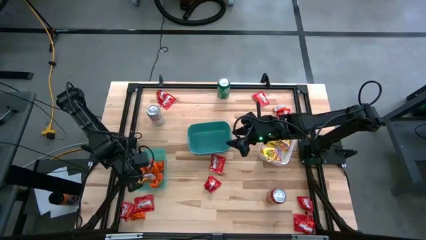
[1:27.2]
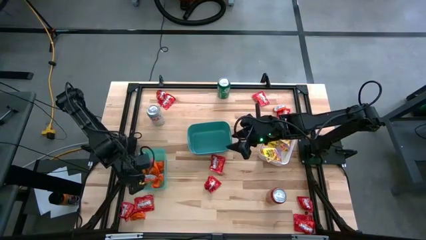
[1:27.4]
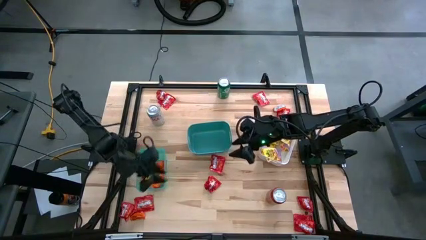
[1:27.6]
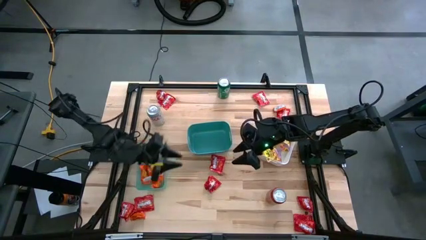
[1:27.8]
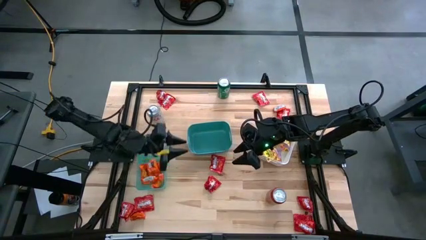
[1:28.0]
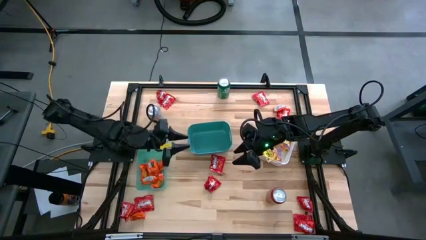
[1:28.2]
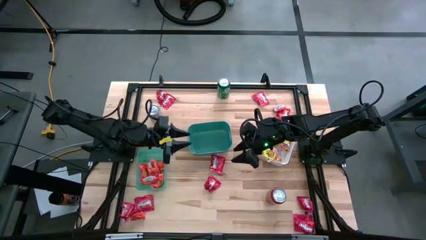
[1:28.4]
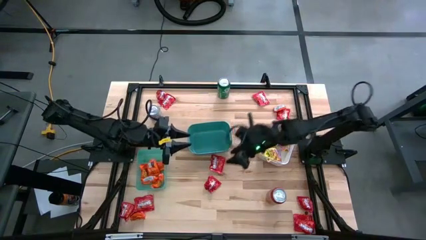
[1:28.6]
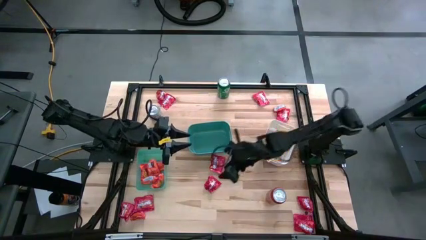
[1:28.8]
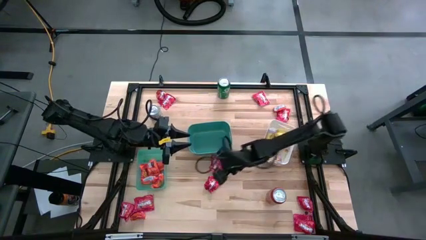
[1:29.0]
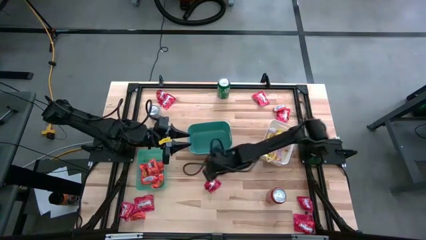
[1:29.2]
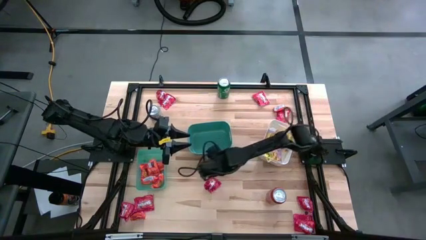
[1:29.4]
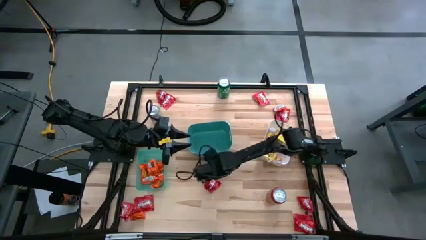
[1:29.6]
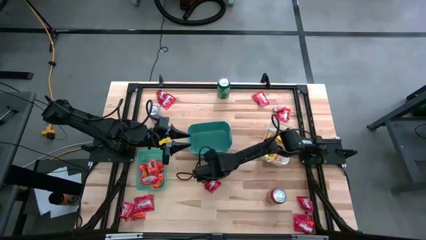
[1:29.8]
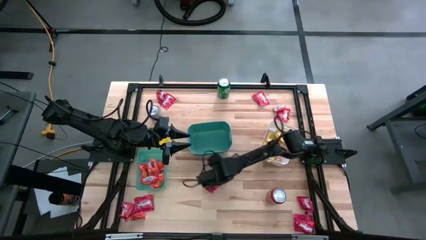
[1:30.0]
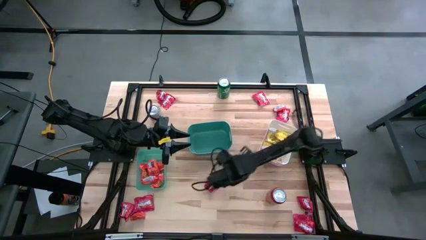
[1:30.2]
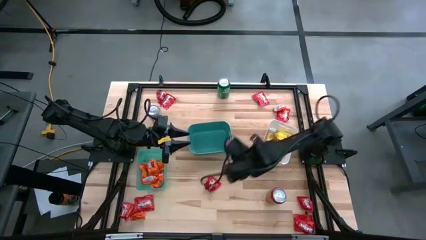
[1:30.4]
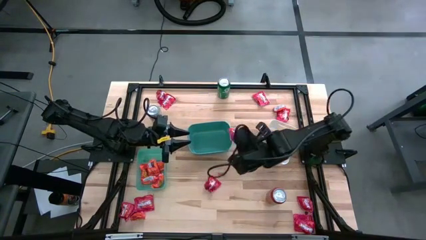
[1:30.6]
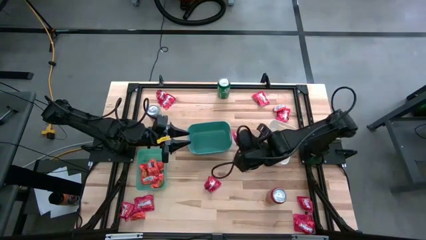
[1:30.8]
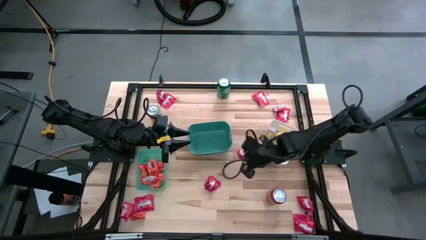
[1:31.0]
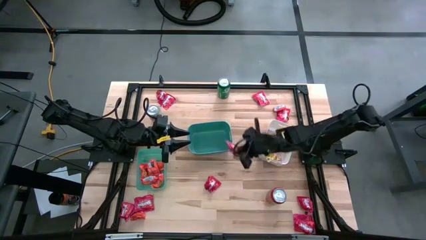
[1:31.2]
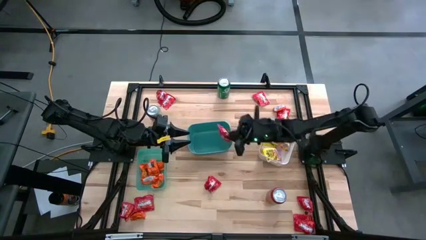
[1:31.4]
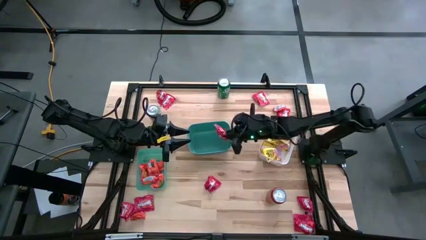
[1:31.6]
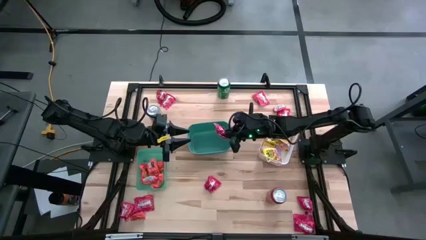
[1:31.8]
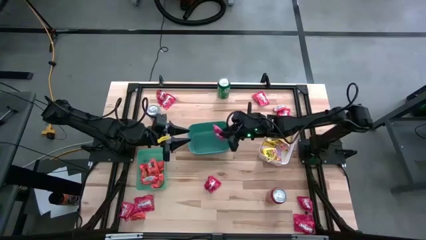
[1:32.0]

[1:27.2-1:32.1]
Task: Sort candy
Put the red candy into the green bin

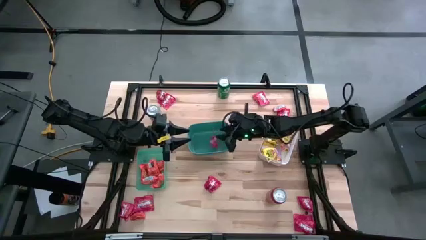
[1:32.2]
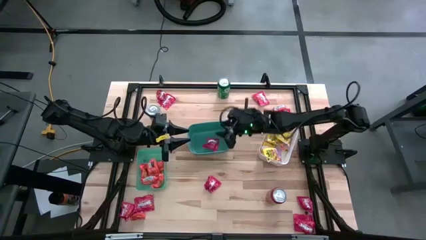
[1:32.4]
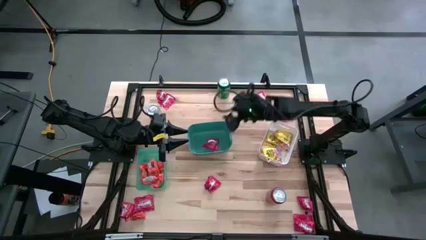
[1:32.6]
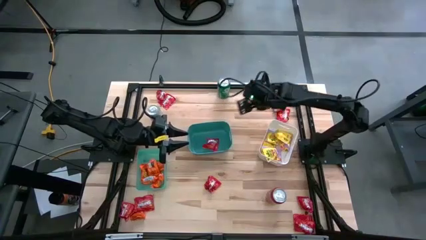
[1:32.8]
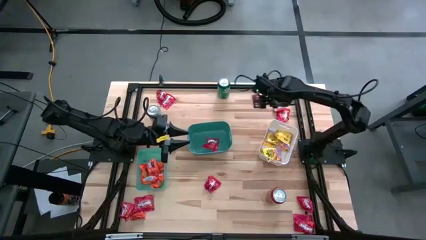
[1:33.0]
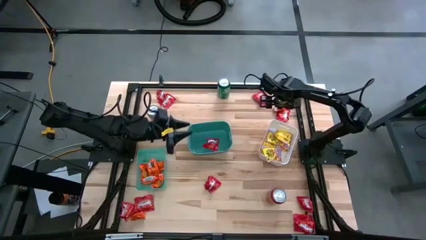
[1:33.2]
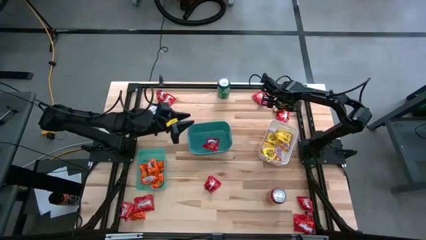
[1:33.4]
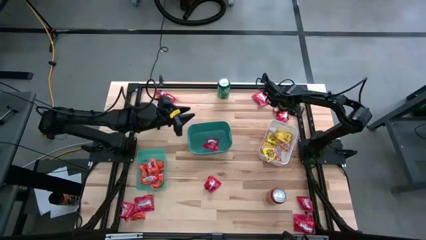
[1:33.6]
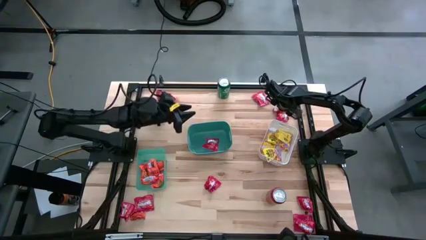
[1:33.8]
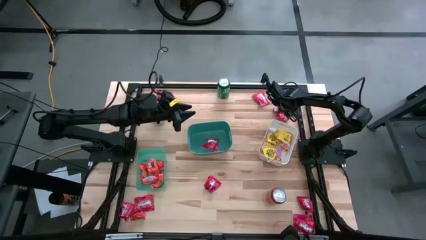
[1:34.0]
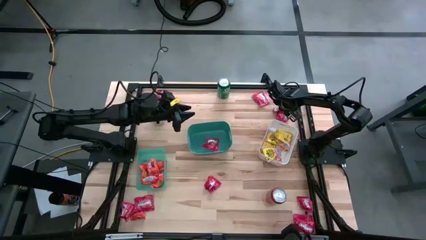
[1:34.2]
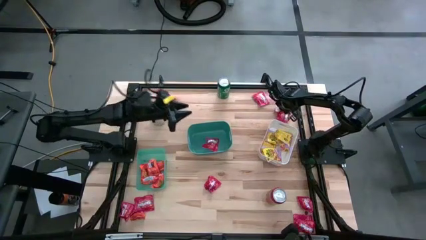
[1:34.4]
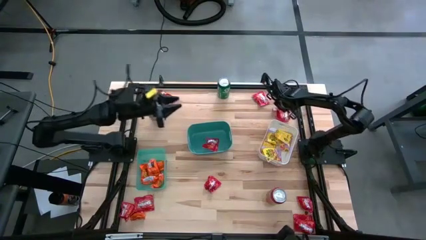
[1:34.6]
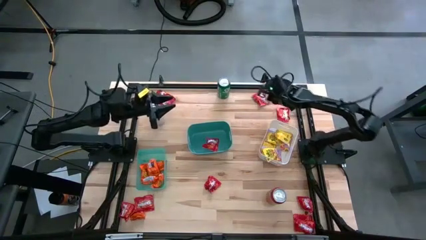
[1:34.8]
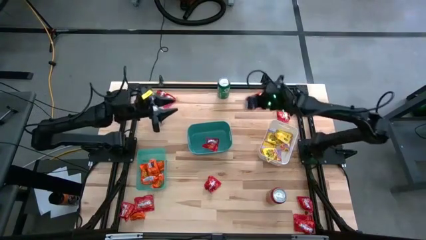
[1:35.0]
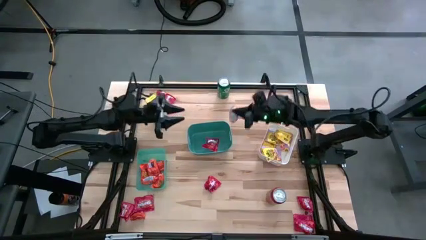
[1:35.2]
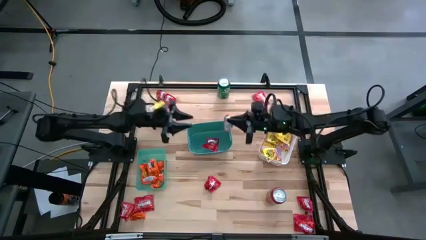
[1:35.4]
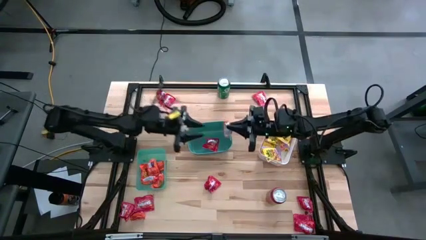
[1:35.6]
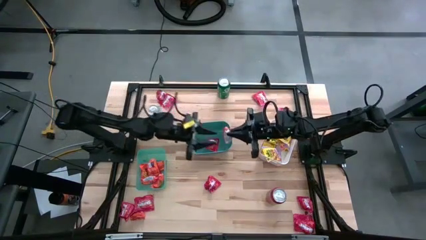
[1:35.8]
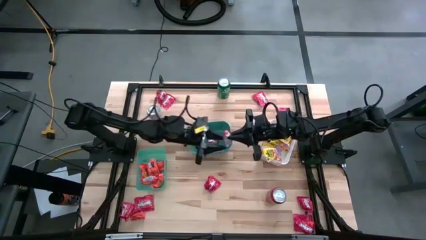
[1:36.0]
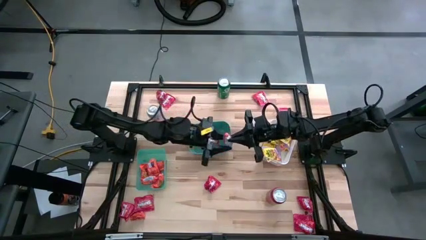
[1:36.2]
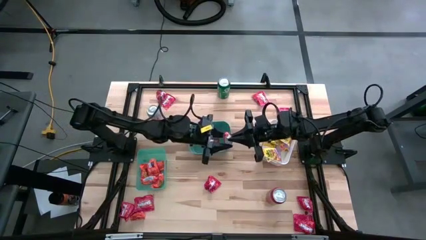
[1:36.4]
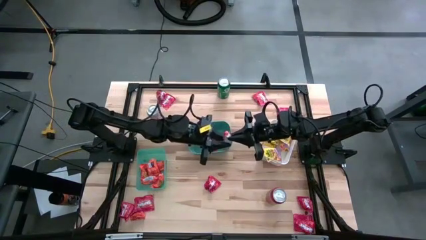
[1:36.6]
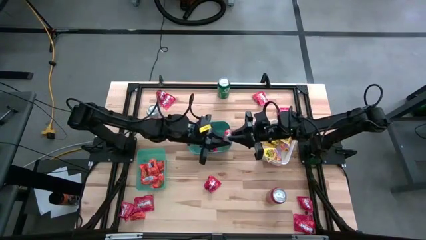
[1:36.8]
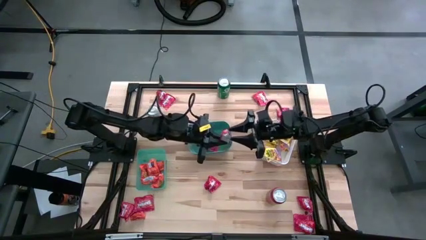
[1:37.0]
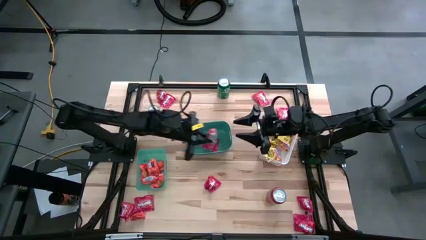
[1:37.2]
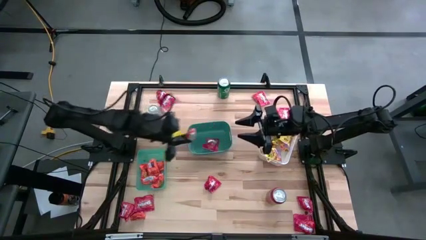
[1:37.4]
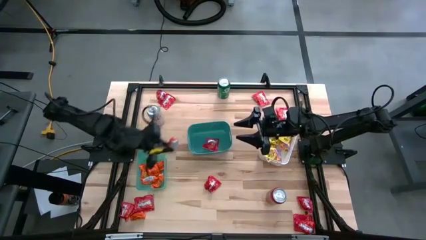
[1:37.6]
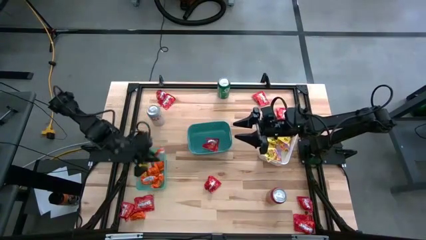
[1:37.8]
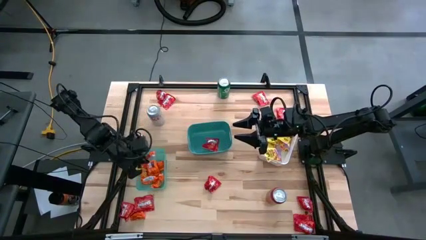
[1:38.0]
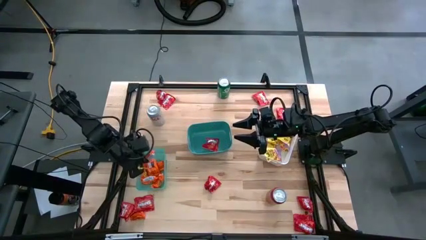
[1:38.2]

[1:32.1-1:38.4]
Put the orange chocolate into the light green bin

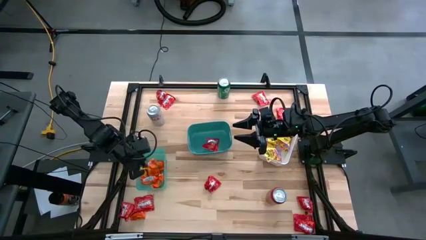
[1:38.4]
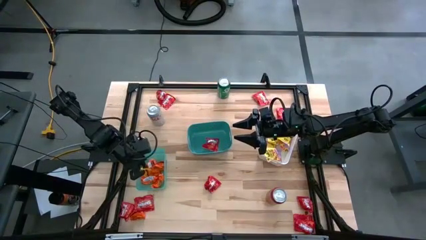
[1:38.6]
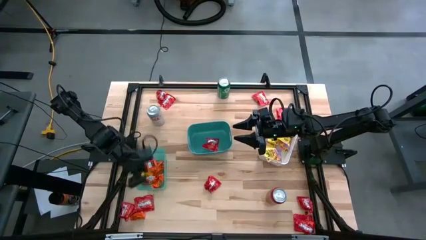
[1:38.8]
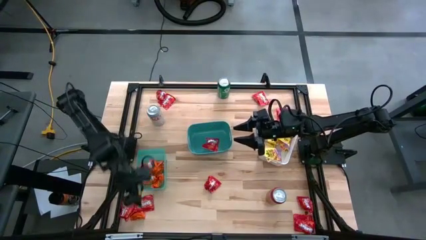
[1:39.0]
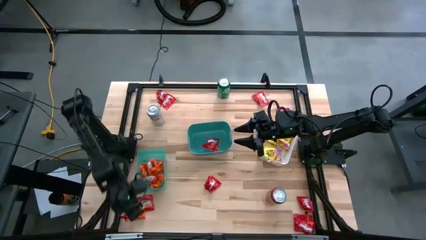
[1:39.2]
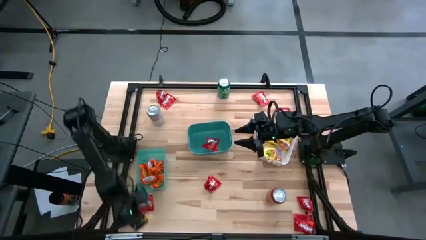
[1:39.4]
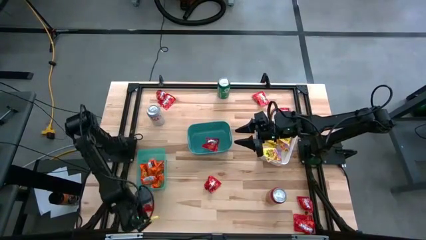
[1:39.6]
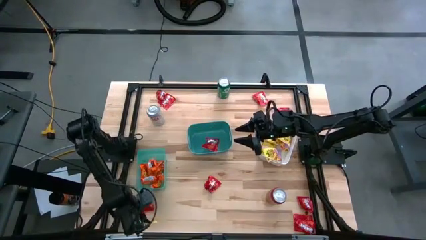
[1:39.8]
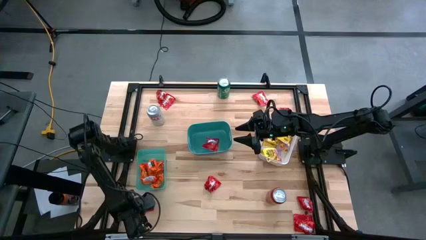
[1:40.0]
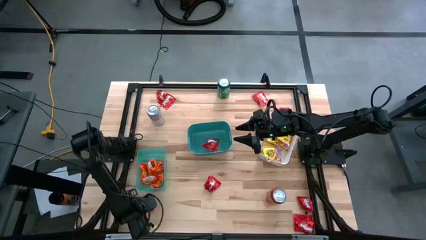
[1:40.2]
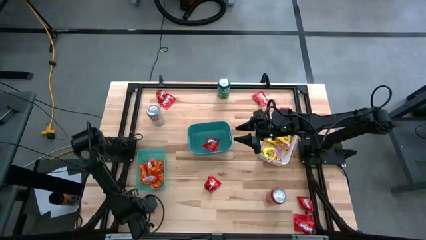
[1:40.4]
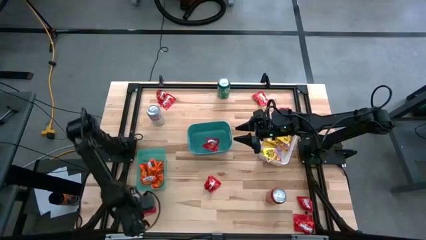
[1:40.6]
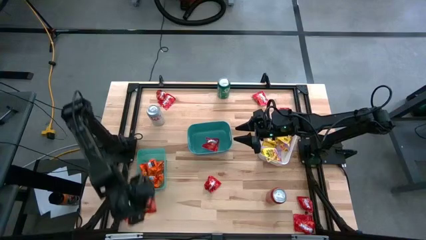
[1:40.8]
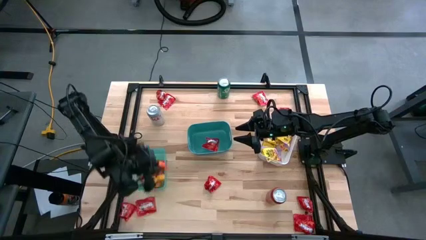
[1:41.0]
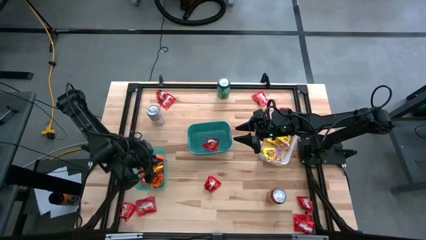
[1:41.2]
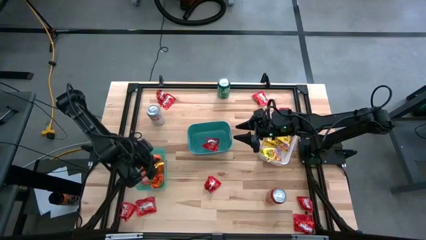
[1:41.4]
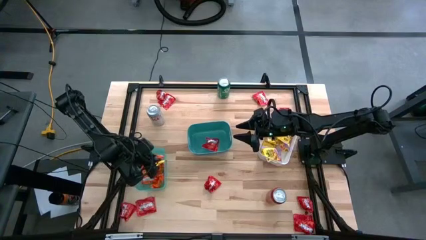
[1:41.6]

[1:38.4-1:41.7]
Put the orange chocolate into the light green bin

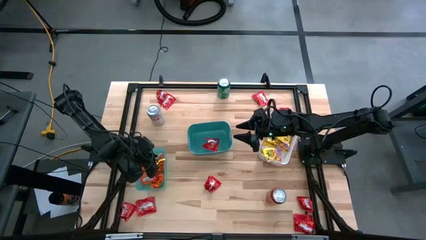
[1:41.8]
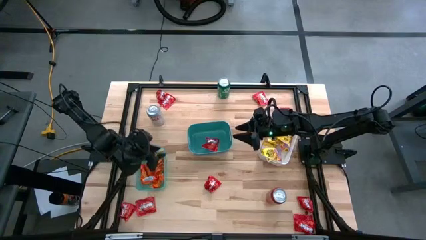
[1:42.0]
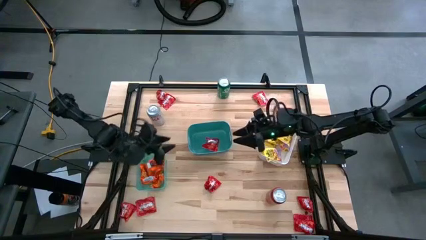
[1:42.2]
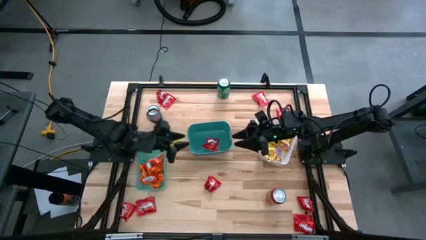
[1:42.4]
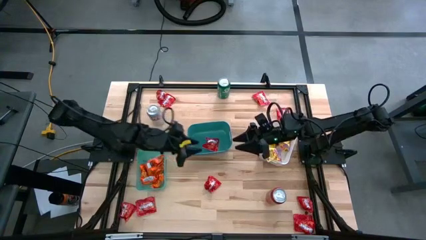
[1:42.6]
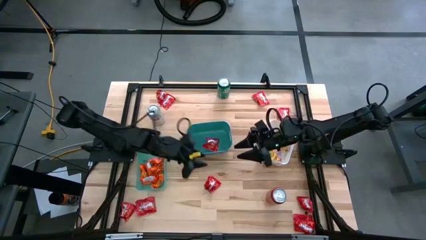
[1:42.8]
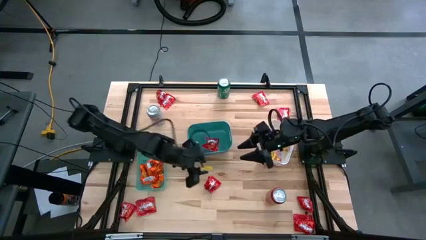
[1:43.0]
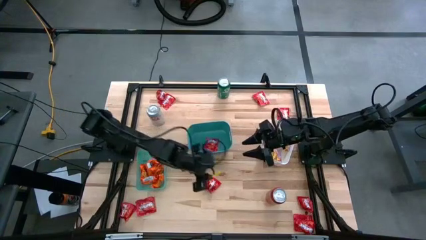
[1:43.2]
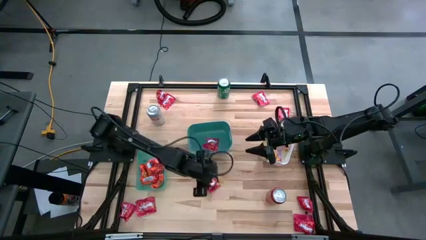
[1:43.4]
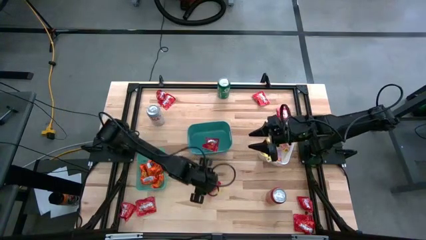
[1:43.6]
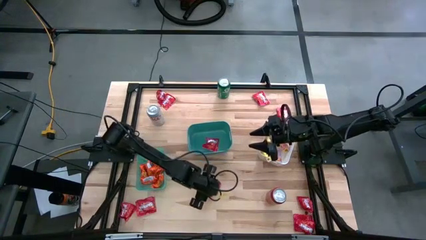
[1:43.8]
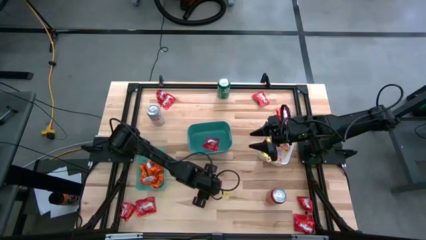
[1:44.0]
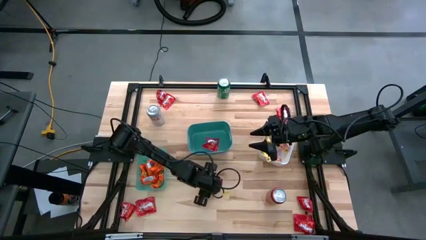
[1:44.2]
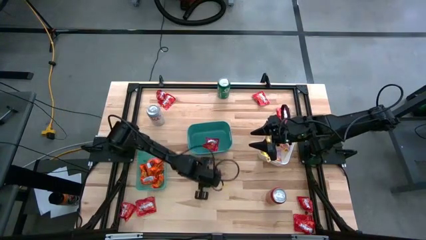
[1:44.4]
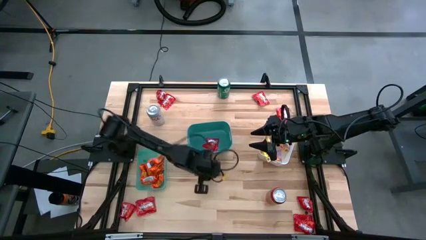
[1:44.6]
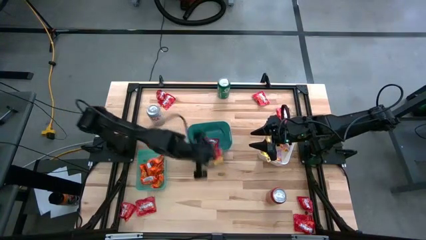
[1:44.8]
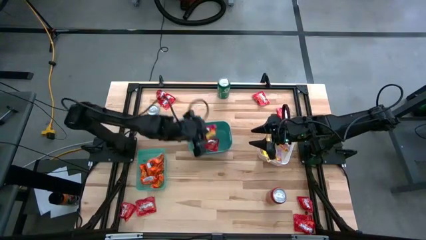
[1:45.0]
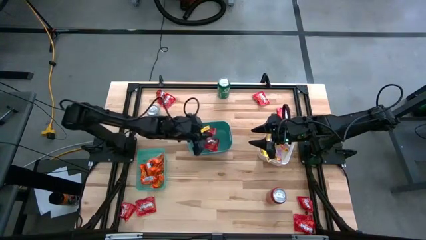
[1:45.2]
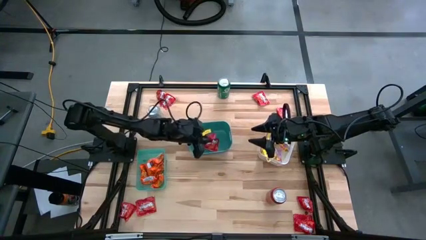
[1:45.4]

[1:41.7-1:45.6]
Put the red candy into the green bin
